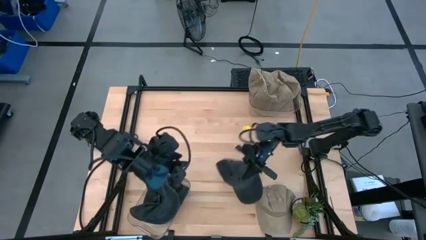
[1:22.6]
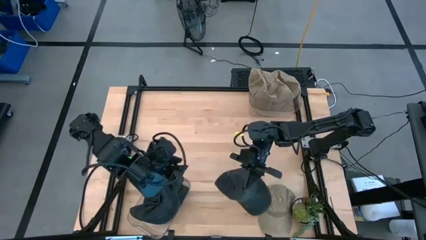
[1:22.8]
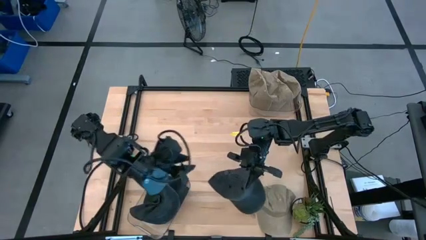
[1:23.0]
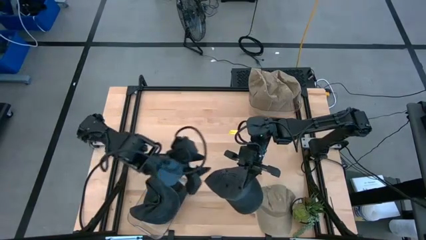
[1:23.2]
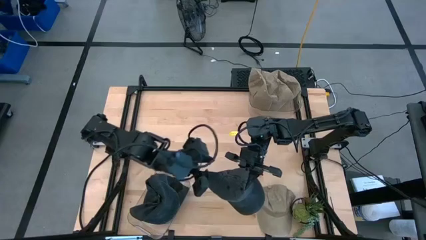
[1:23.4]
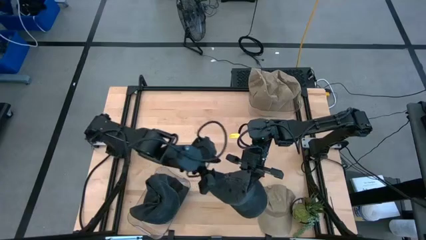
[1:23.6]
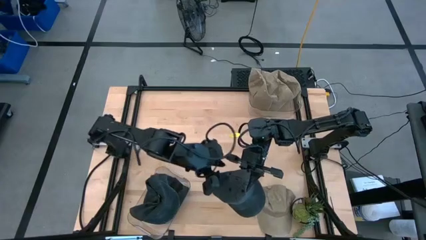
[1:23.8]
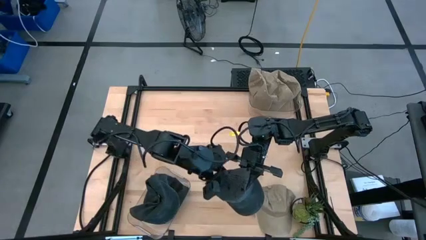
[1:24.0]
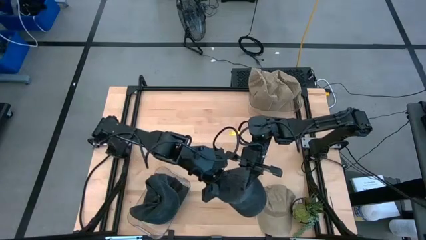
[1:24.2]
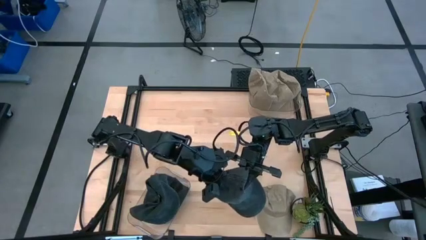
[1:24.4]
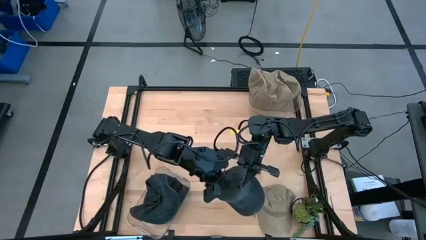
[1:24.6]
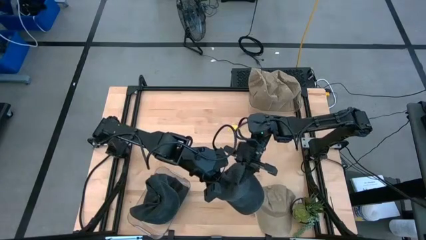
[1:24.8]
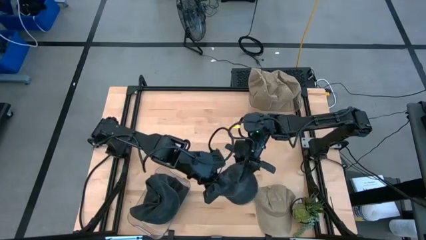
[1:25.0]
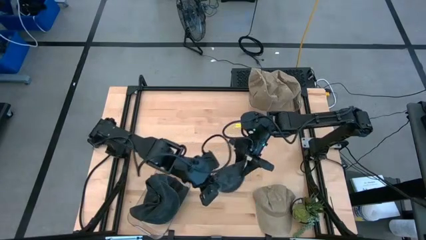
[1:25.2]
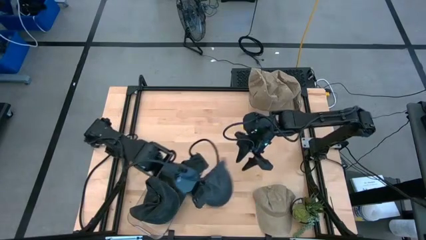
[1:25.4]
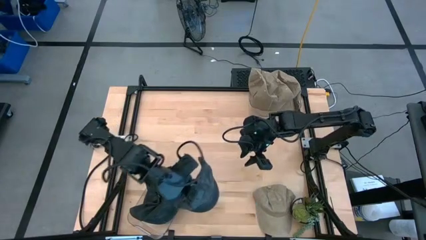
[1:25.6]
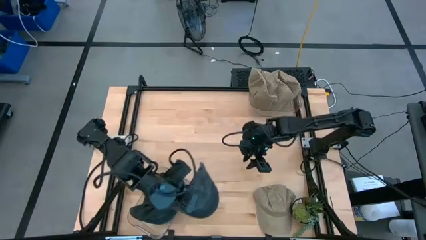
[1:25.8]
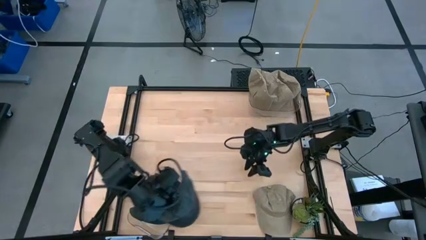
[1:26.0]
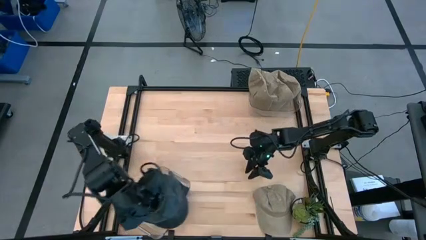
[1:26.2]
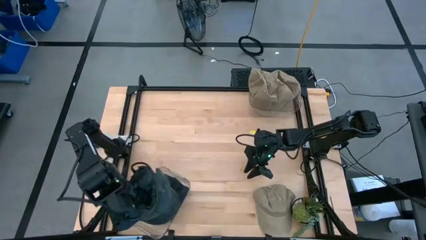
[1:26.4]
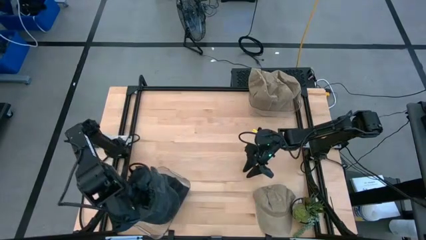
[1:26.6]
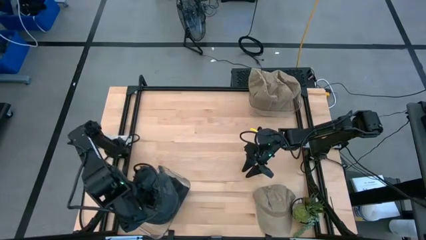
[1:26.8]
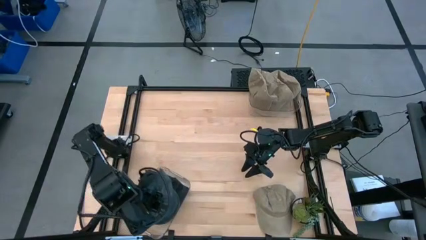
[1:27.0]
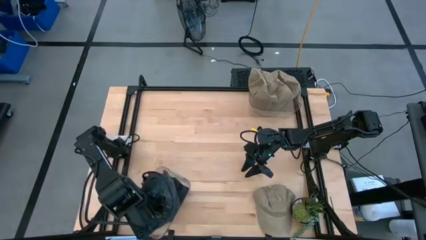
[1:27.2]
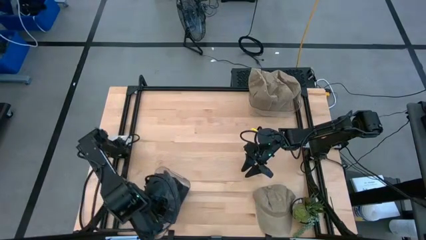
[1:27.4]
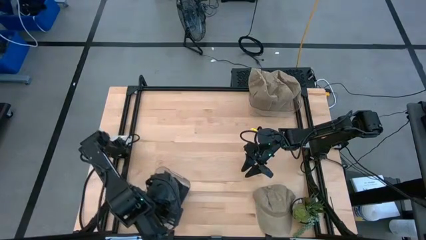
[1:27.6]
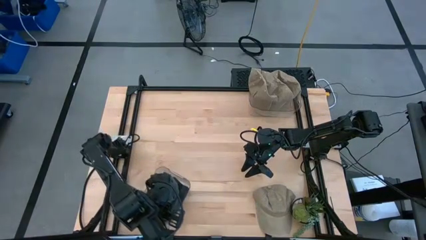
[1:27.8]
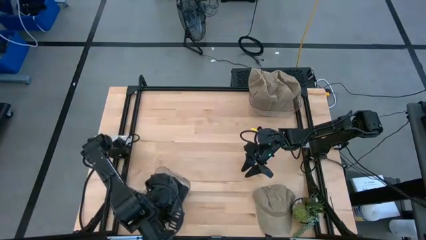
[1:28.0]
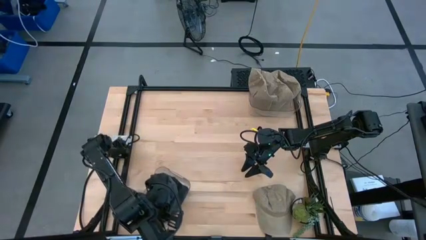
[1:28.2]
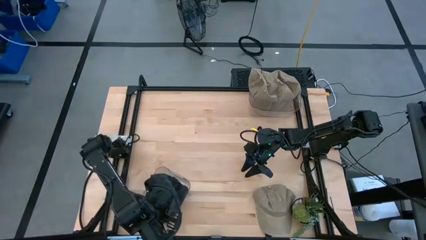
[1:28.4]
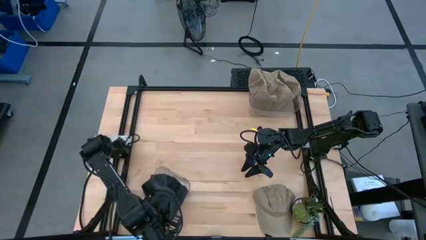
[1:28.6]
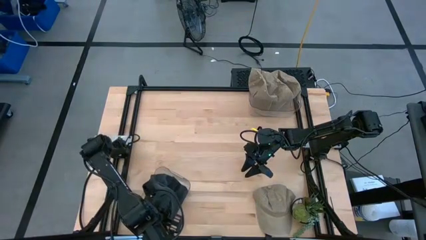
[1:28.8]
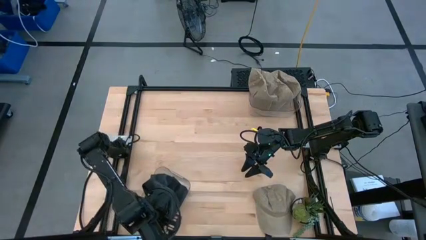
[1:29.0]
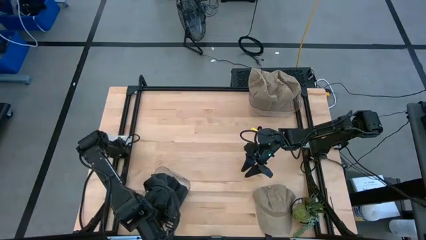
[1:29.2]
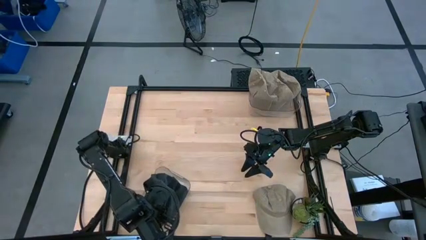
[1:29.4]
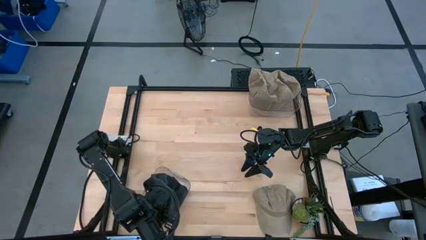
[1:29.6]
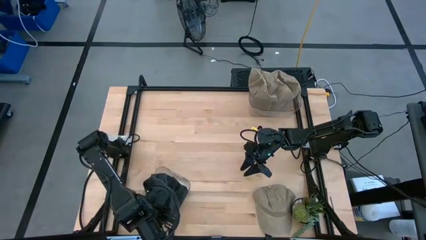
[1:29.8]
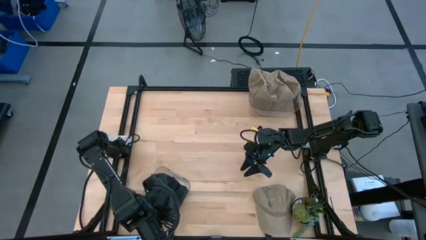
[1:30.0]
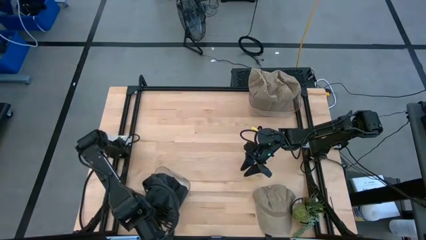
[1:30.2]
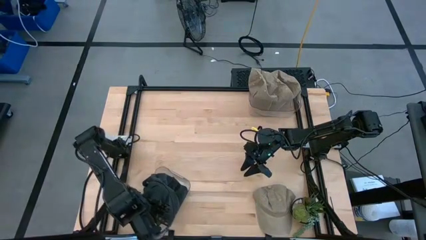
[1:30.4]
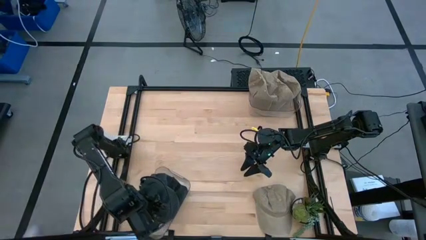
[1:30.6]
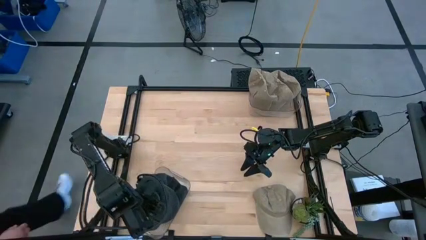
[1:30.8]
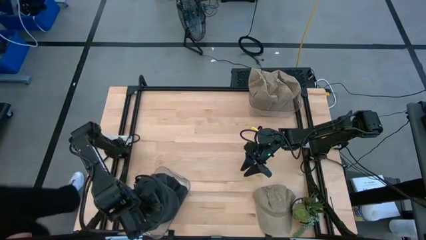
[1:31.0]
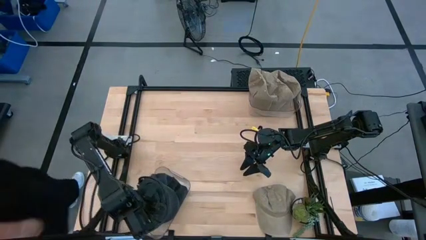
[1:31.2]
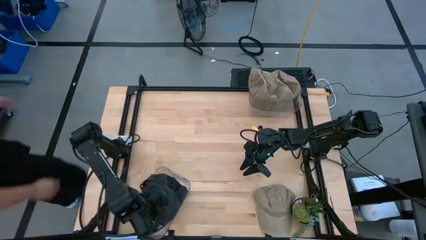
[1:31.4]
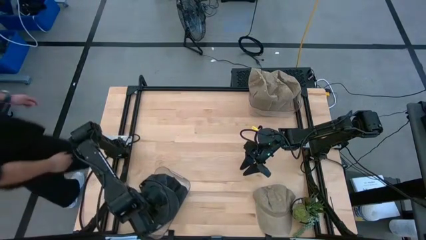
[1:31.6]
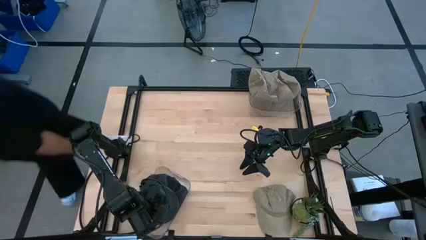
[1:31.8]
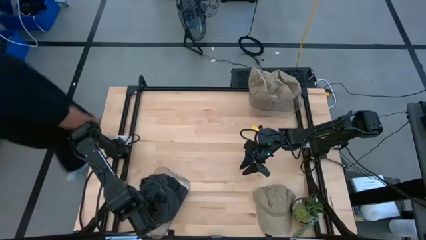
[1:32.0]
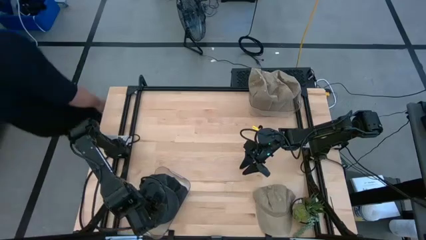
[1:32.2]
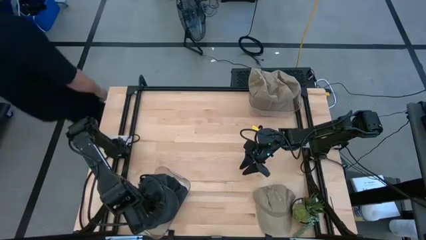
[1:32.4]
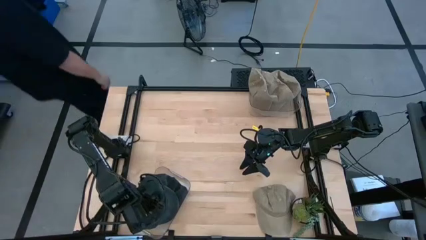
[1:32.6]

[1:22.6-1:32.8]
Task: Pick & Place hat
Put the black cap into the bottom transparent bin

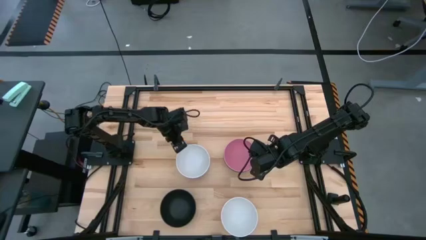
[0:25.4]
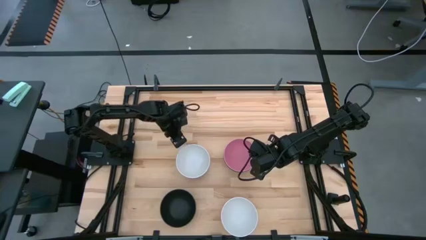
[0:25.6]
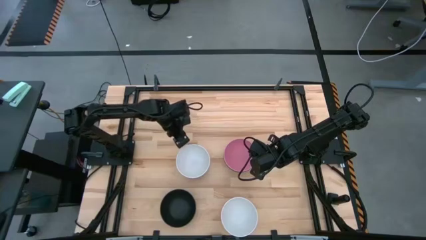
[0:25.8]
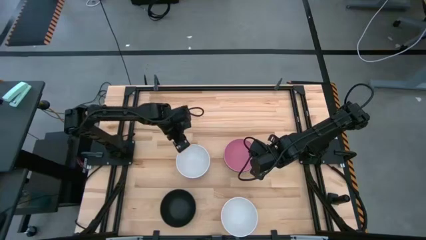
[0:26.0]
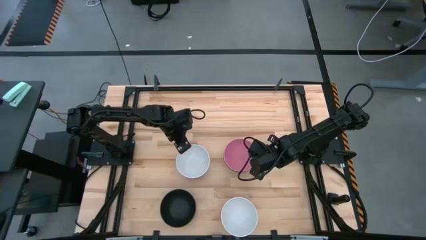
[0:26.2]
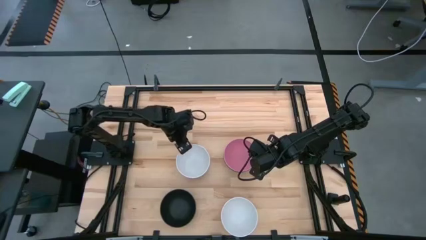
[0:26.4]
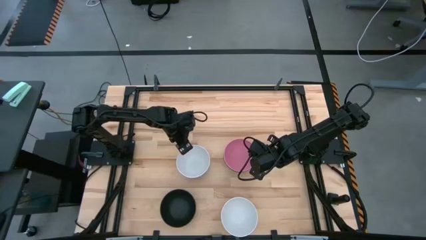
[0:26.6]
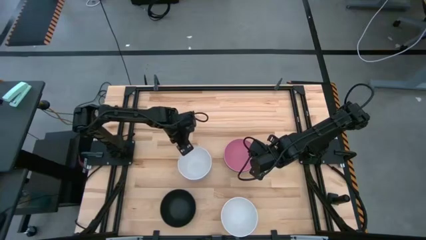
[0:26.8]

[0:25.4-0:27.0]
Task: Nest bowls inside each other
Stack the left stacked bowls on top of the right stacked bowls
